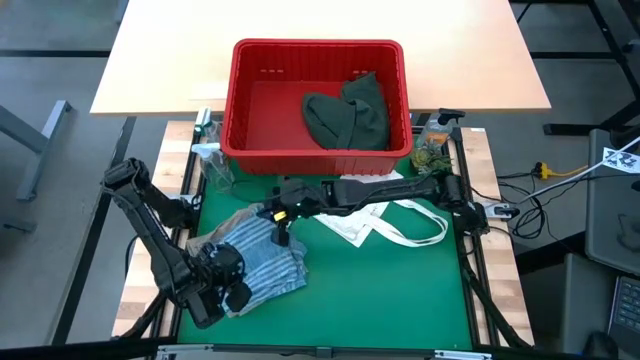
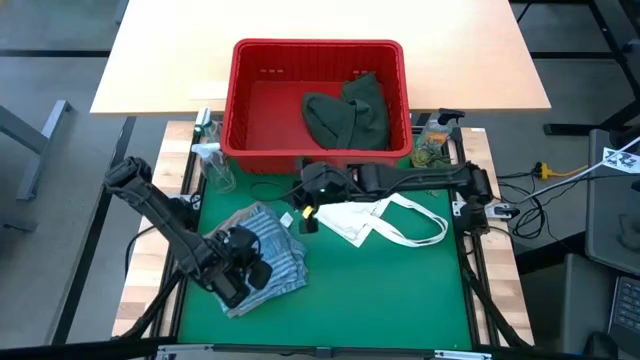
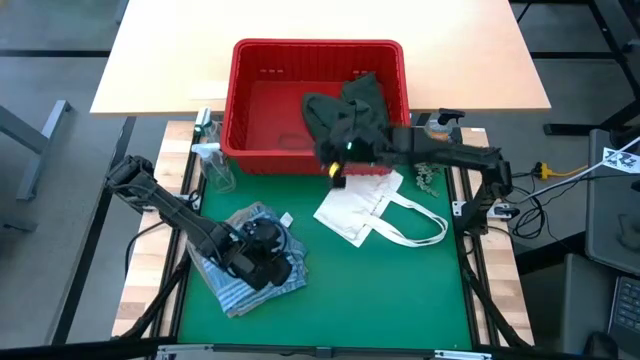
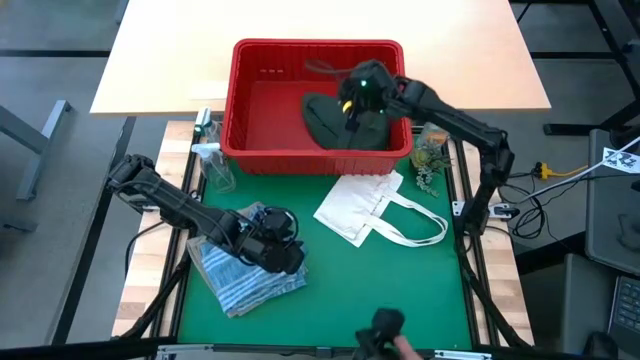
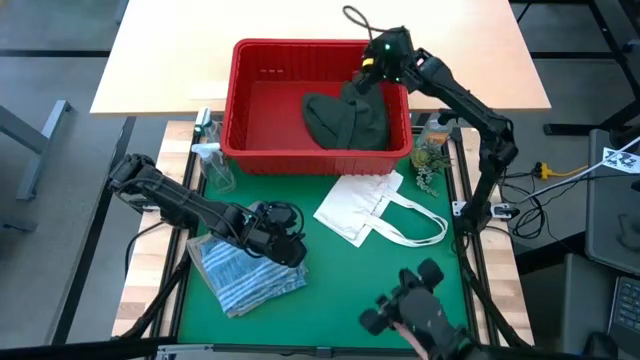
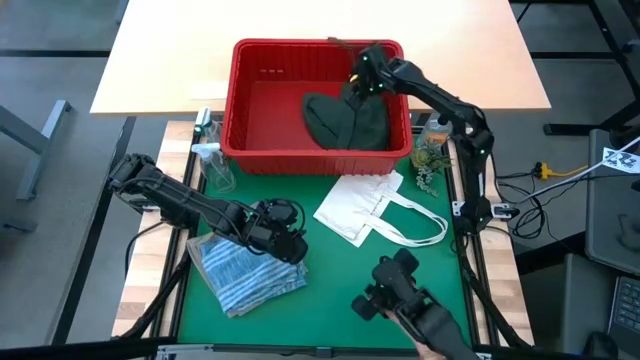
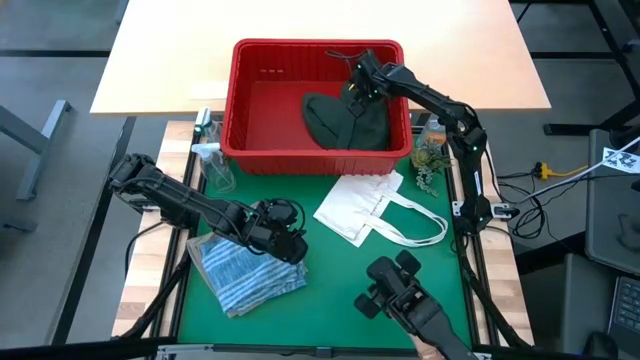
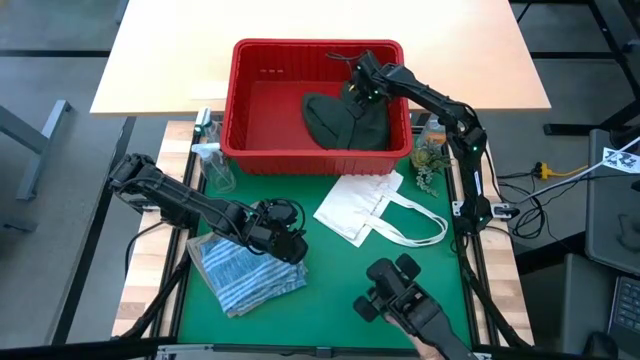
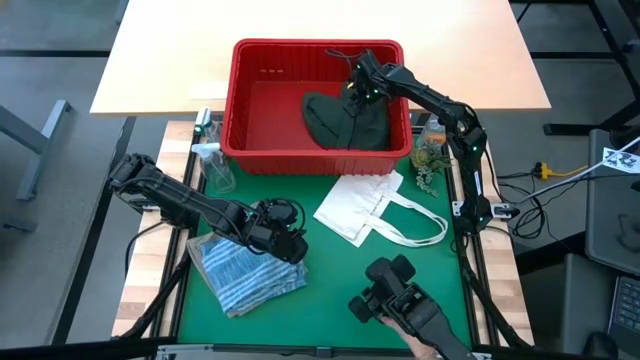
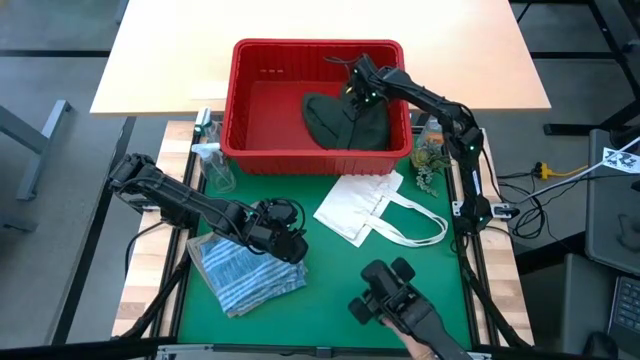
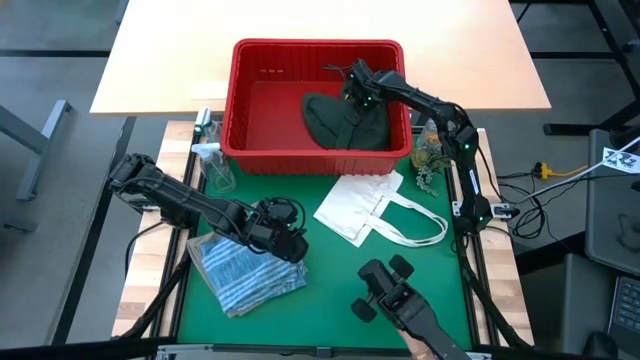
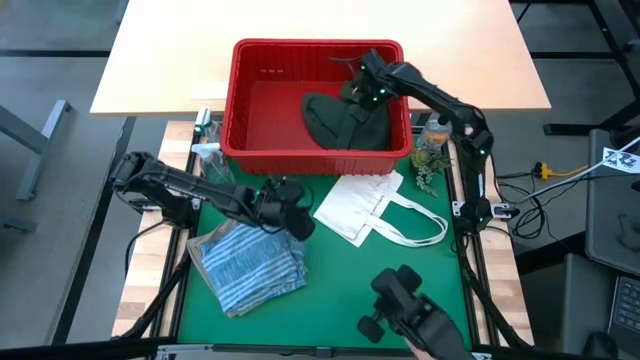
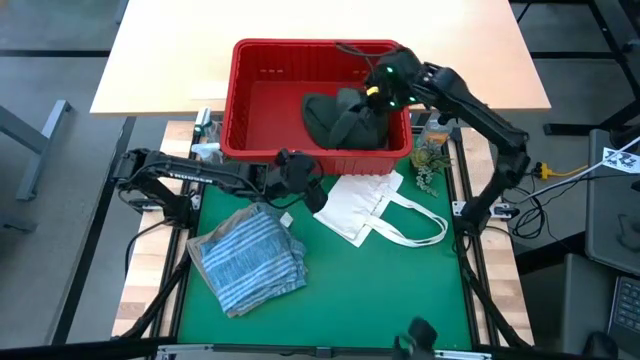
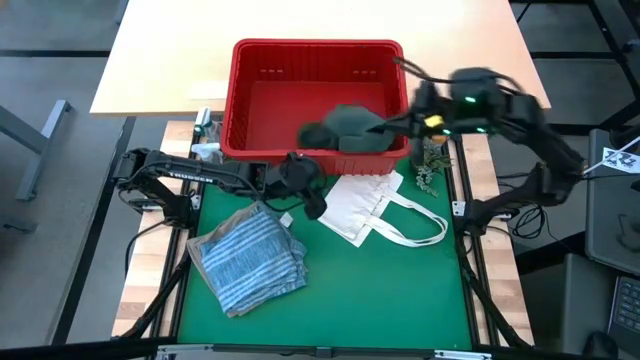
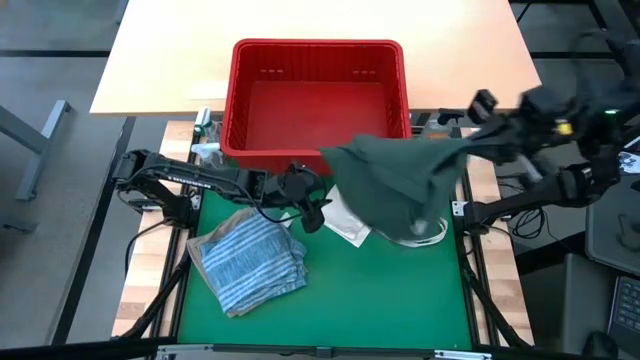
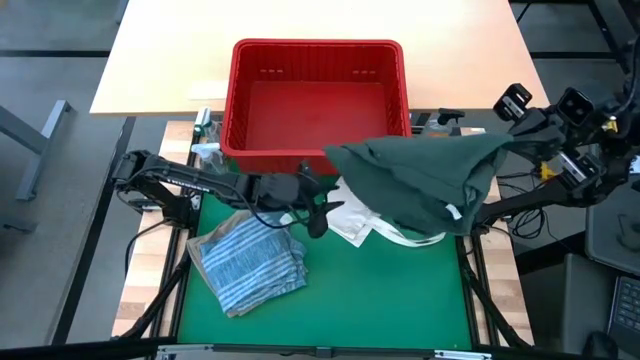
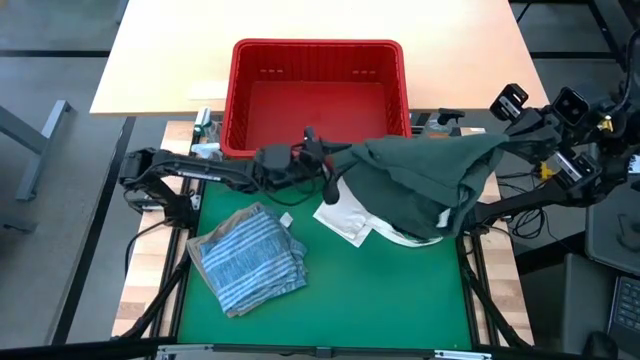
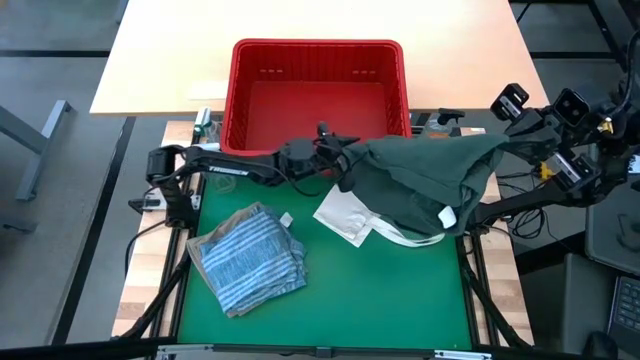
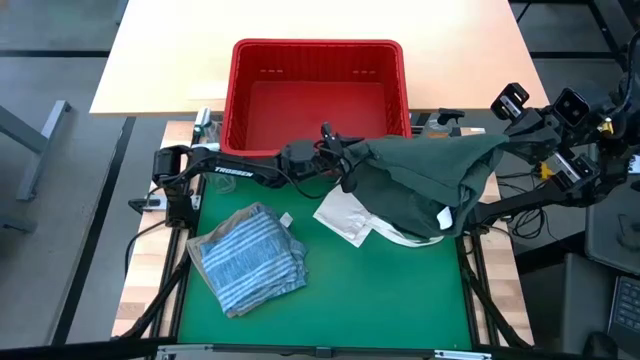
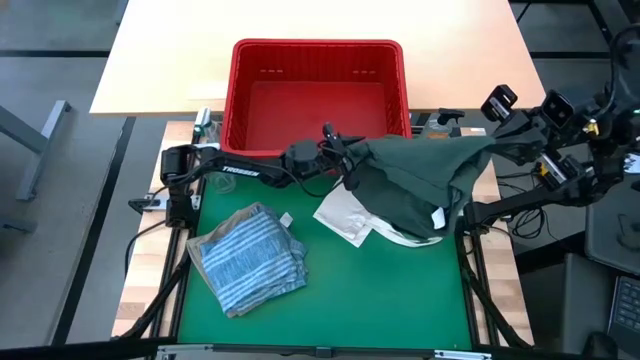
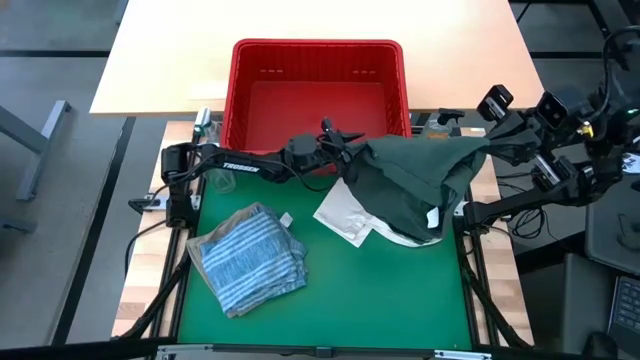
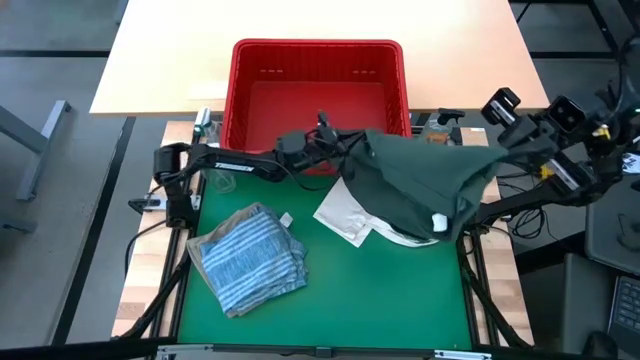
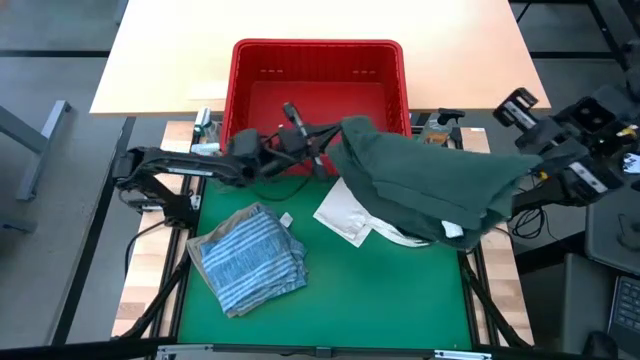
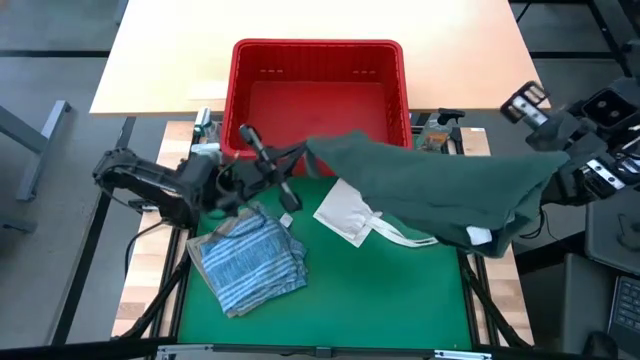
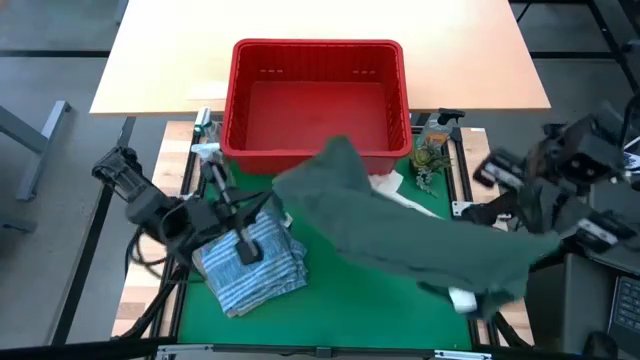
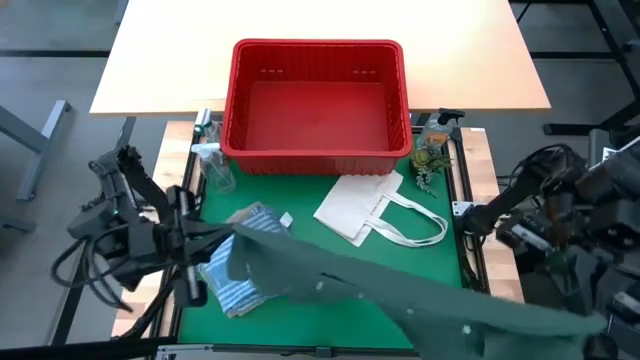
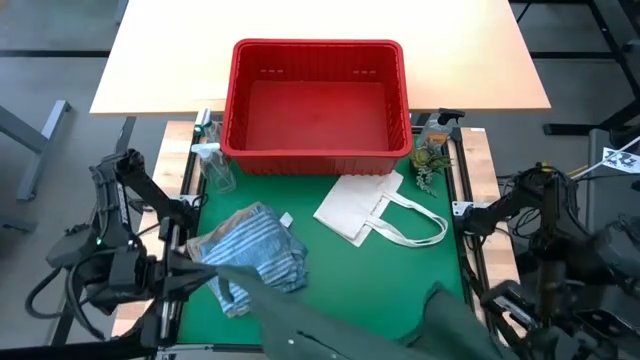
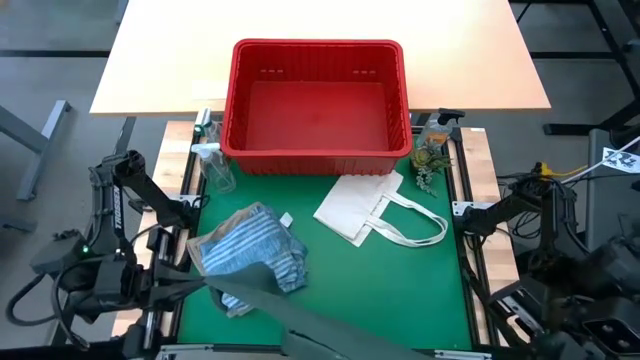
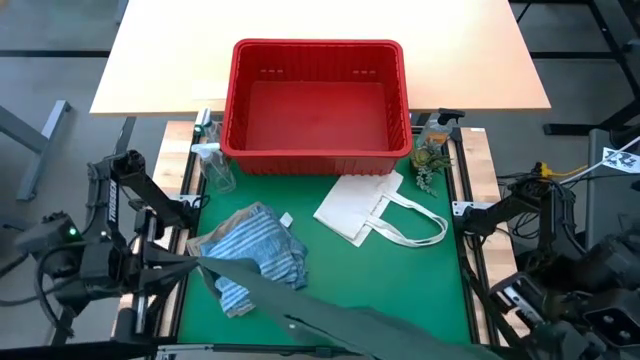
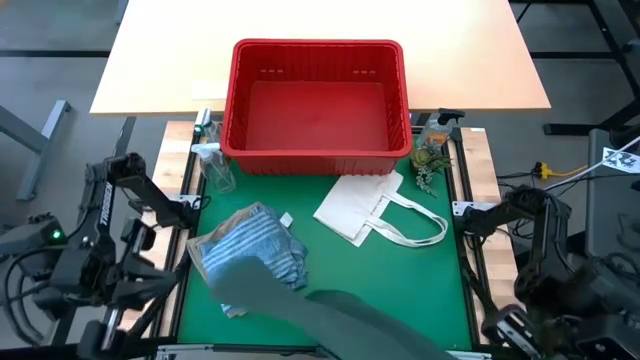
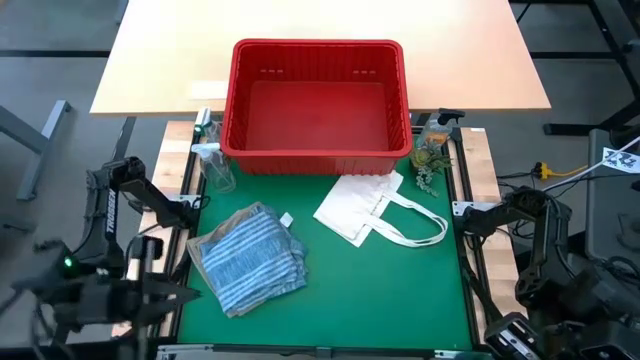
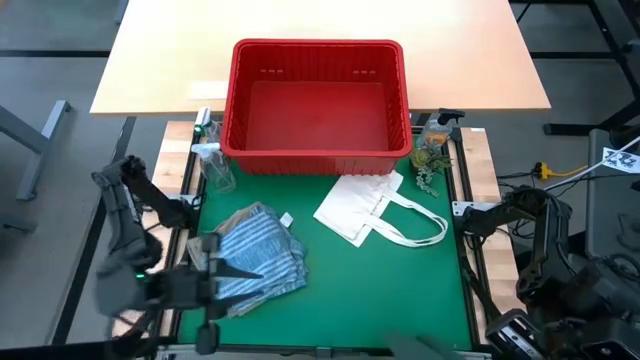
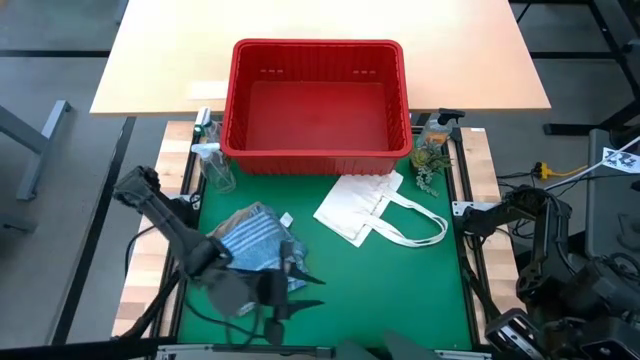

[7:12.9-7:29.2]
Task: Fold Laundry from Bin
Remove the green polo shirt from the red bin
